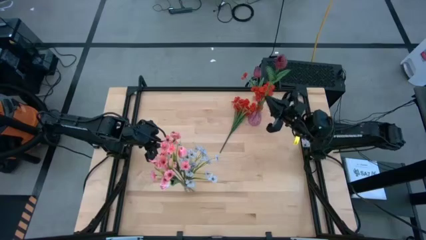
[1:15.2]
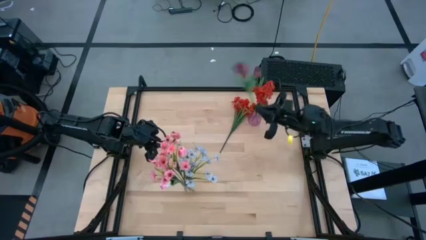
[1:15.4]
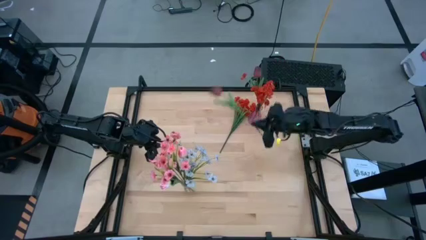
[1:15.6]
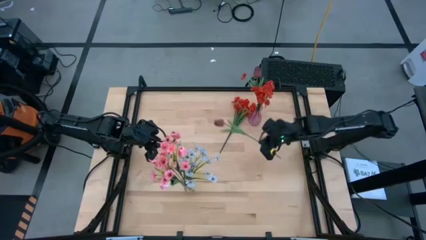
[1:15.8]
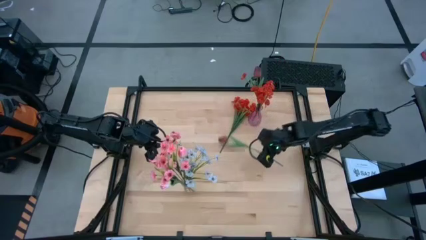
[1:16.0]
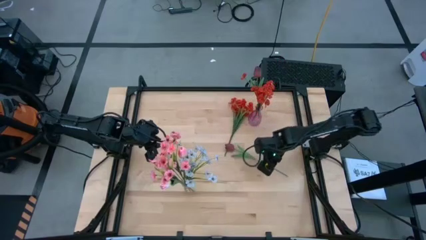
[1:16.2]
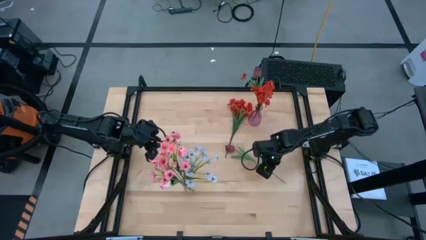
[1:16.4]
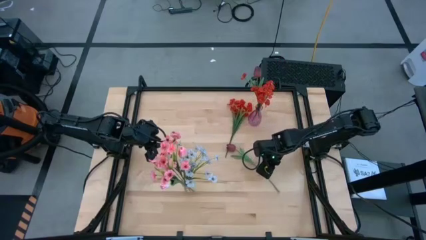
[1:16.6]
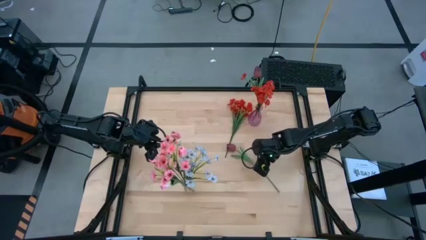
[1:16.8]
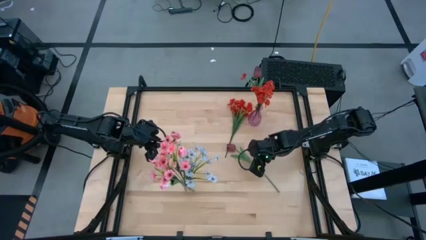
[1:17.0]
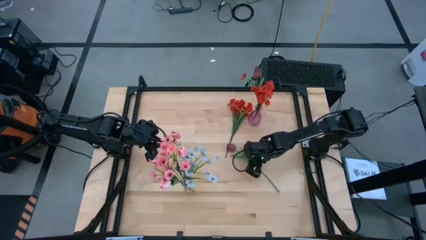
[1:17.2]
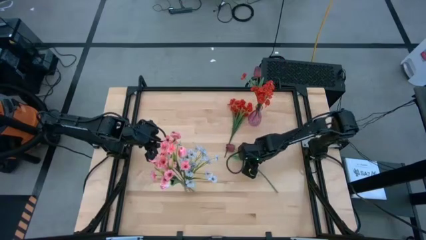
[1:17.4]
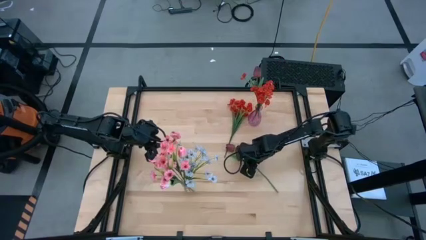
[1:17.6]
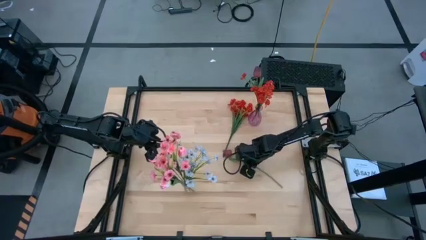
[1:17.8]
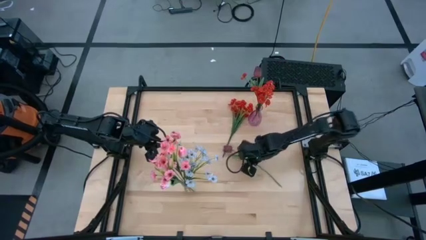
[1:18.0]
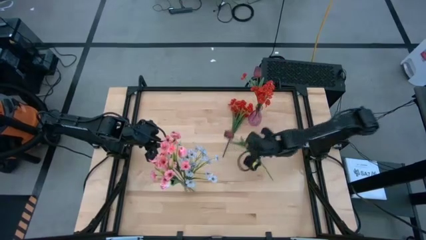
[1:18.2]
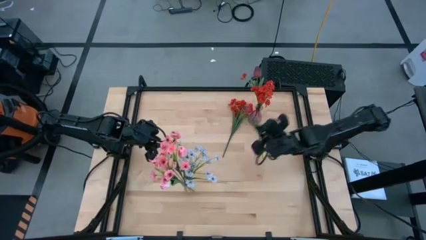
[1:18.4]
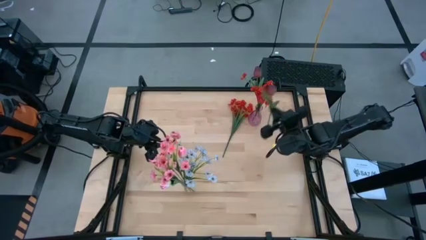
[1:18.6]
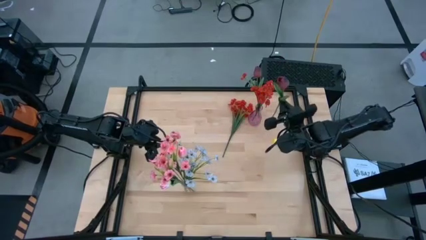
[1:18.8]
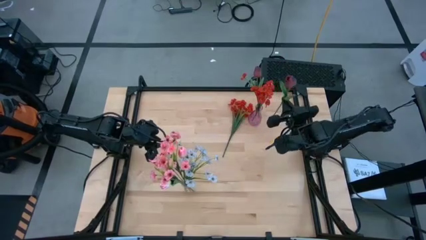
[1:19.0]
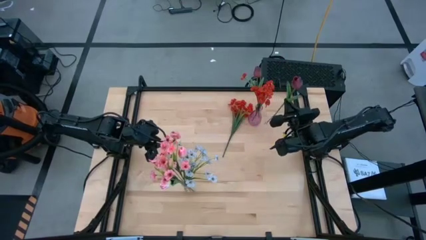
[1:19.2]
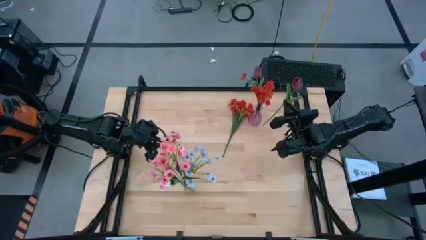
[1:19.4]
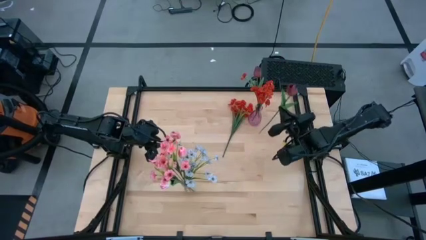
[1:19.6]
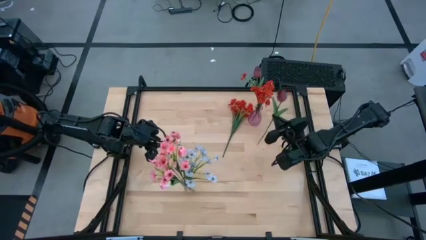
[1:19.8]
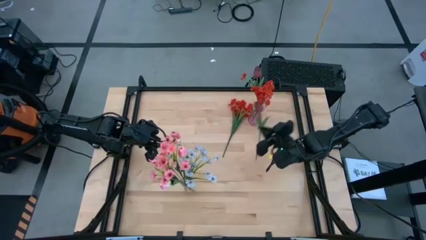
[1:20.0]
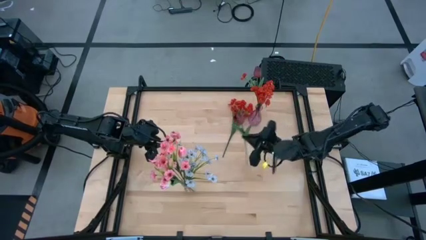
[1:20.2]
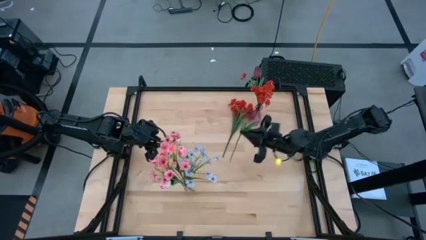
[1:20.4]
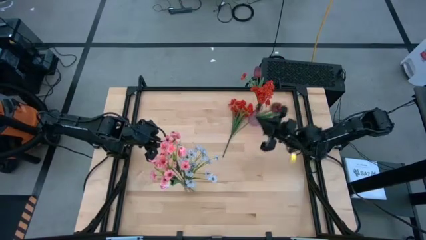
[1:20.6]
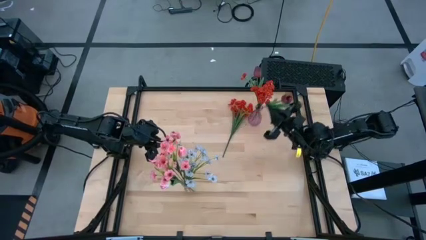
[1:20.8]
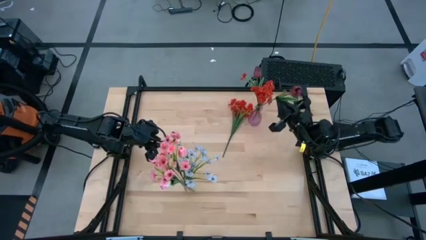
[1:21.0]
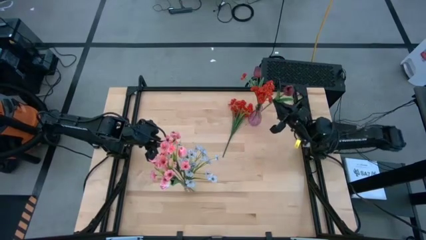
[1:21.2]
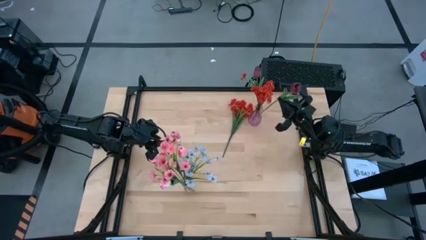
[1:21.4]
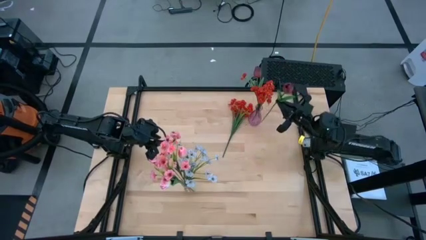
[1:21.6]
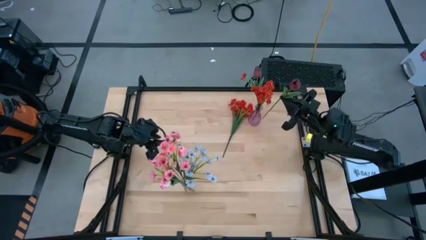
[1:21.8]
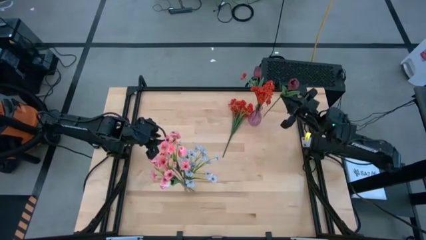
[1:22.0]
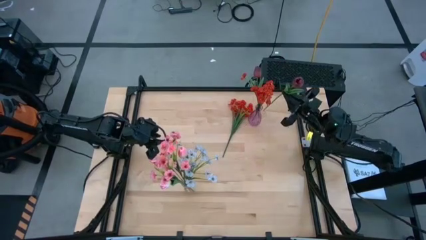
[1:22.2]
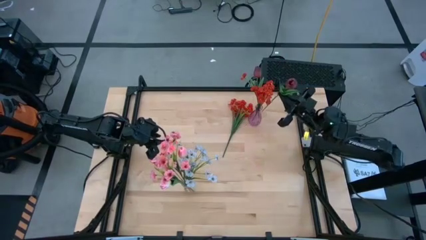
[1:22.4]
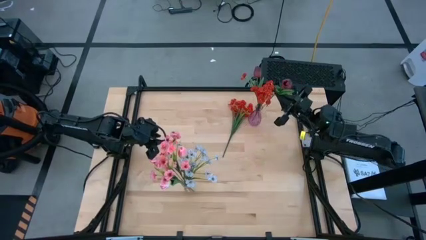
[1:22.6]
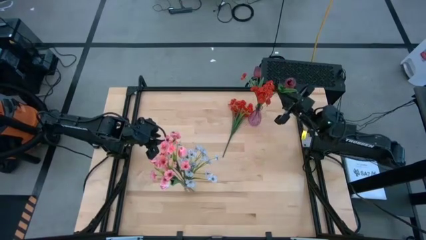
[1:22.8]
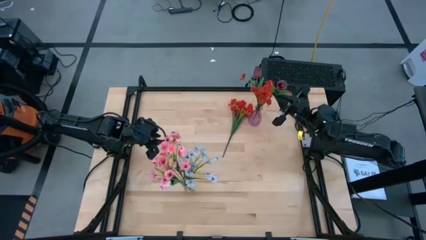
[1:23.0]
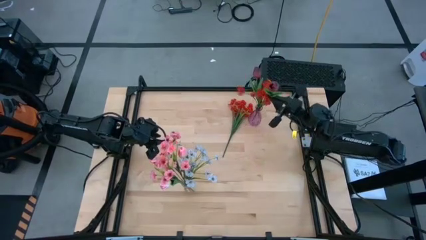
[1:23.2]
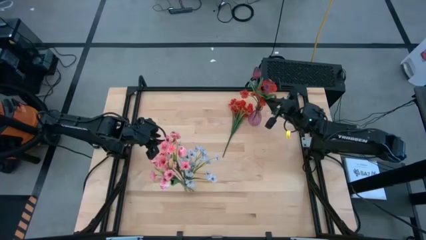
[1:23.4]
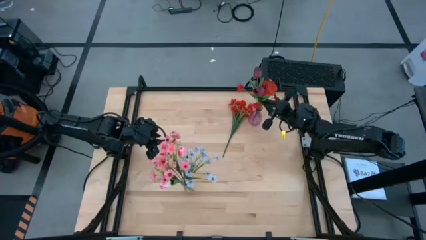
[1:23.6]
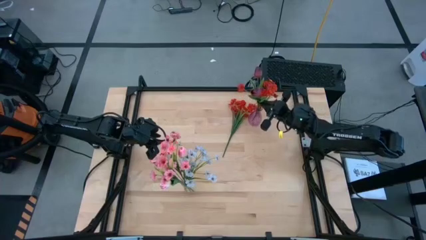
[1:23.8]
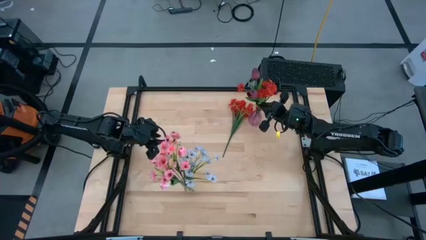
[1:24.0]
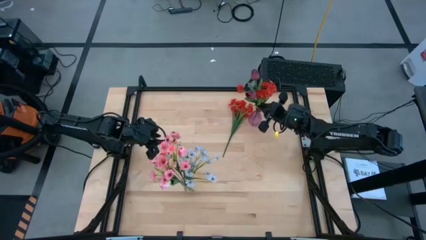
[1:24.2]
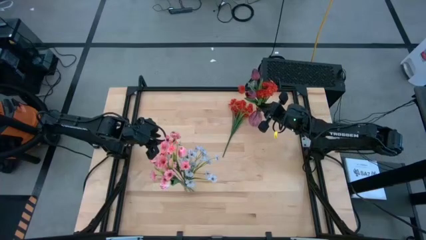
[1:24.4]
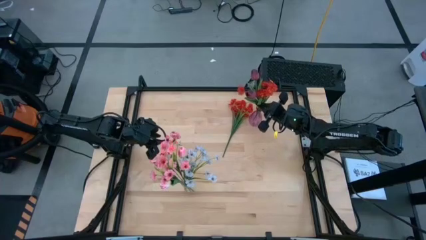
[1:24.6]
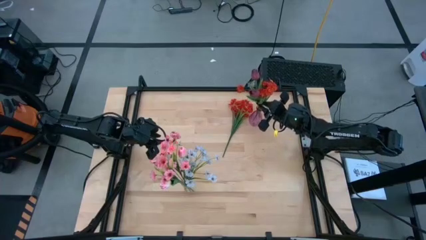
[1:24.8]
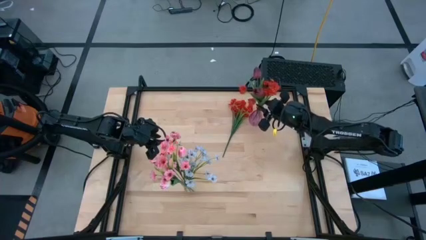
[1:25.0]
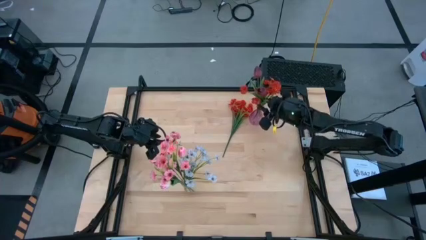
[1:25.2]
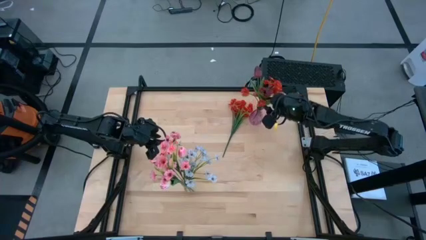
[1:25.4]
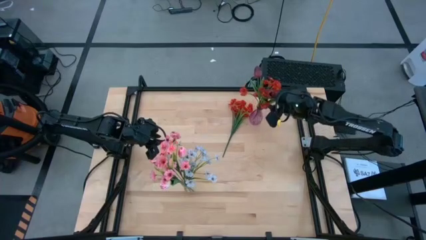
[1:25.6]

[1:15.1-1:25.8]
Task: Sort flowers into vase by color
Put the red flower into the purple vase

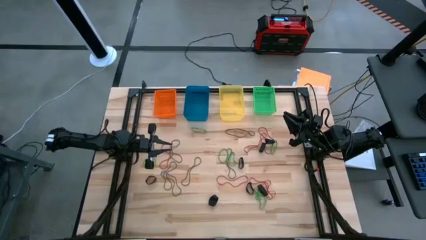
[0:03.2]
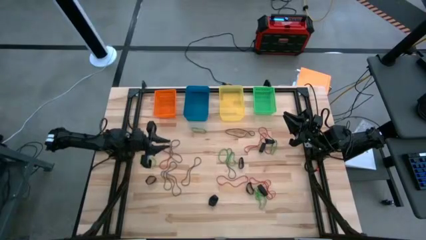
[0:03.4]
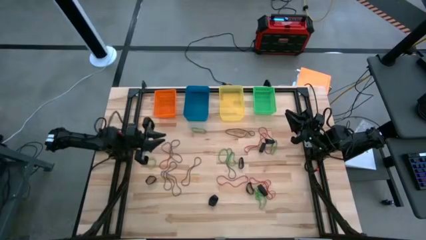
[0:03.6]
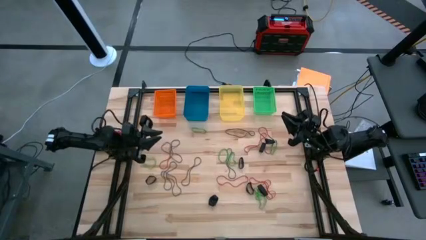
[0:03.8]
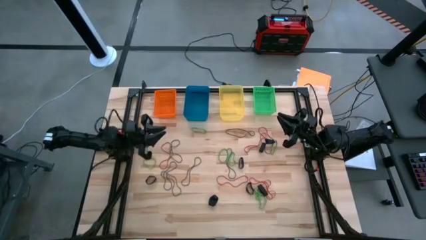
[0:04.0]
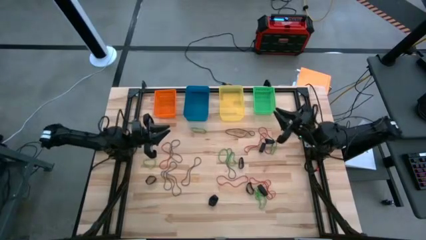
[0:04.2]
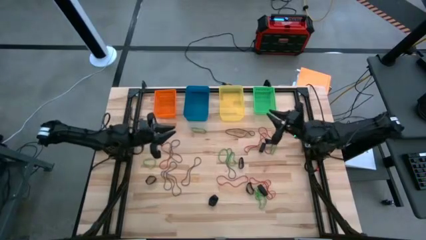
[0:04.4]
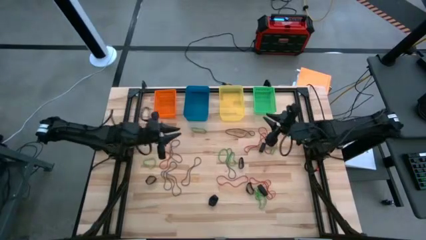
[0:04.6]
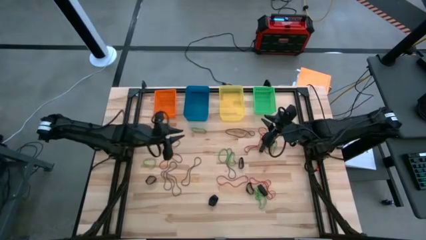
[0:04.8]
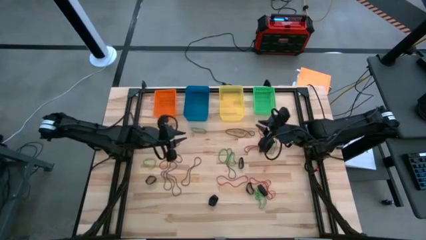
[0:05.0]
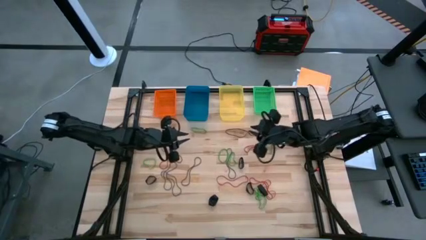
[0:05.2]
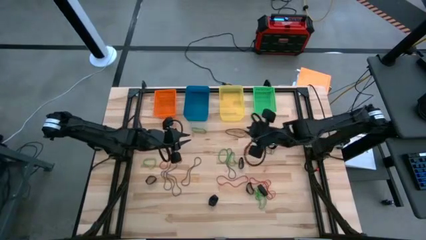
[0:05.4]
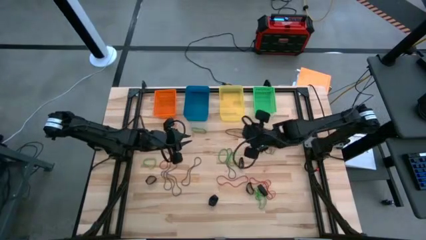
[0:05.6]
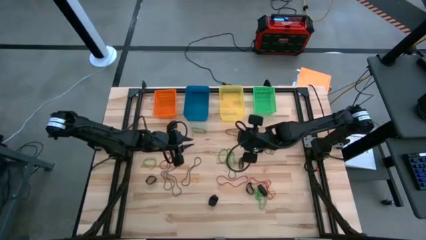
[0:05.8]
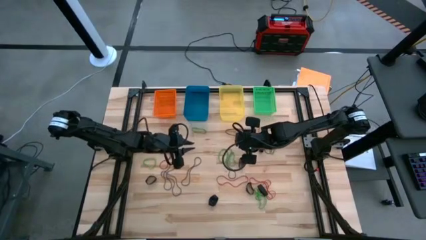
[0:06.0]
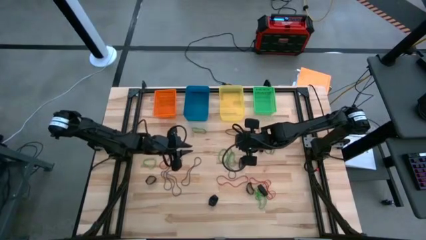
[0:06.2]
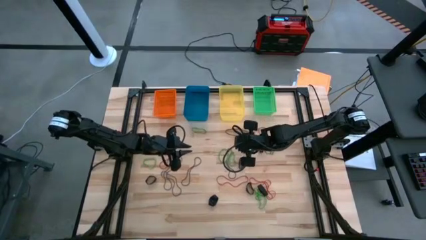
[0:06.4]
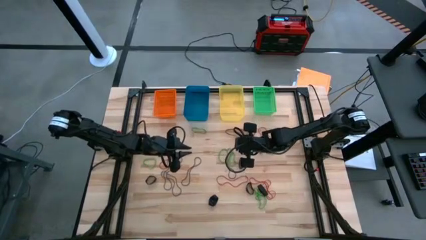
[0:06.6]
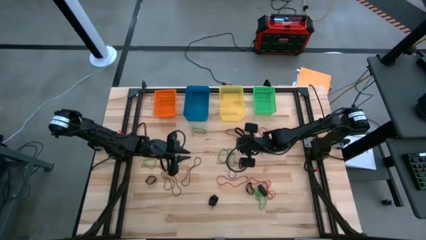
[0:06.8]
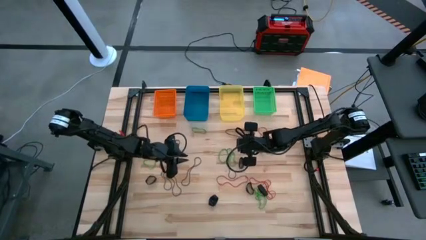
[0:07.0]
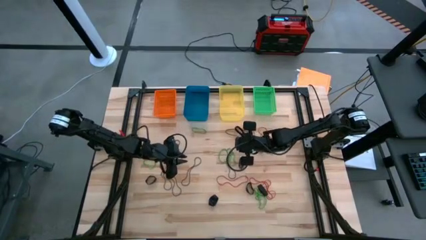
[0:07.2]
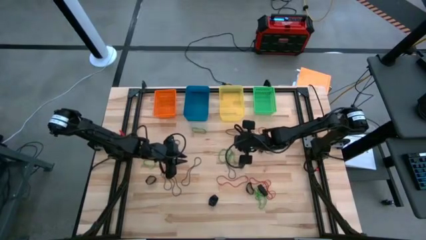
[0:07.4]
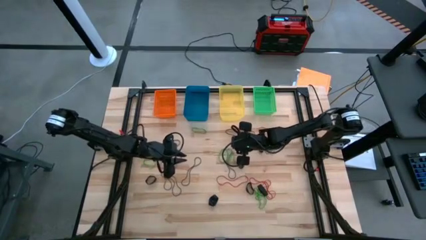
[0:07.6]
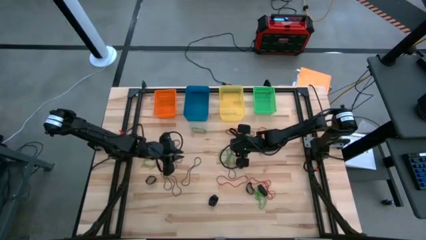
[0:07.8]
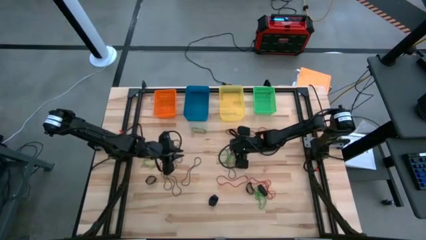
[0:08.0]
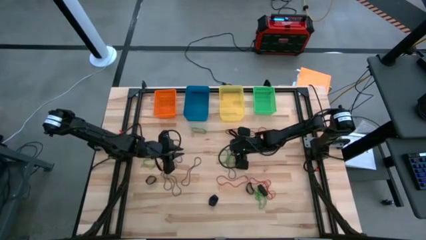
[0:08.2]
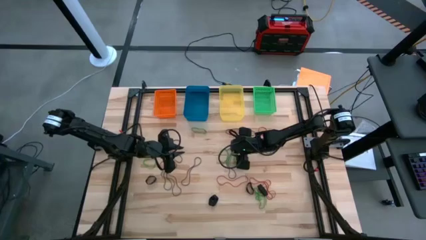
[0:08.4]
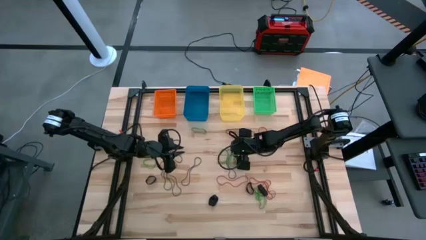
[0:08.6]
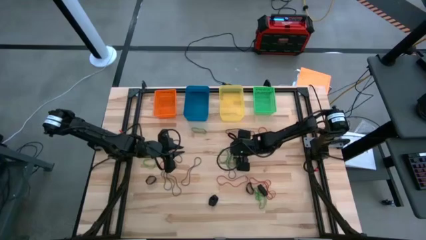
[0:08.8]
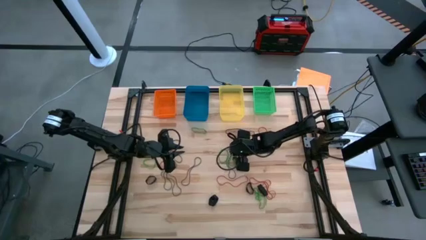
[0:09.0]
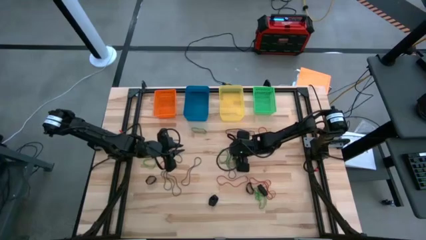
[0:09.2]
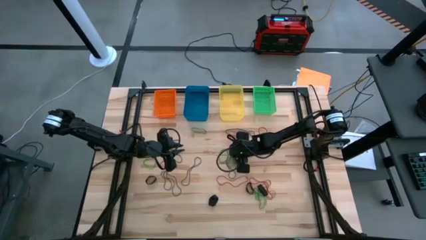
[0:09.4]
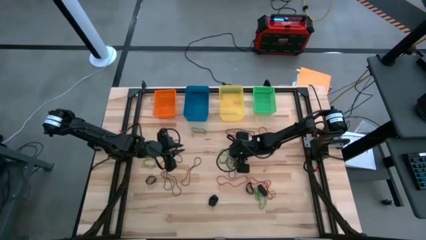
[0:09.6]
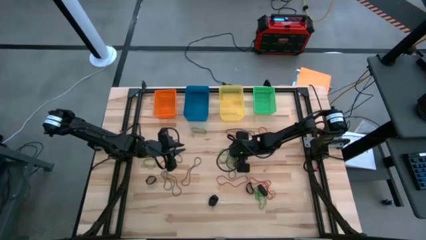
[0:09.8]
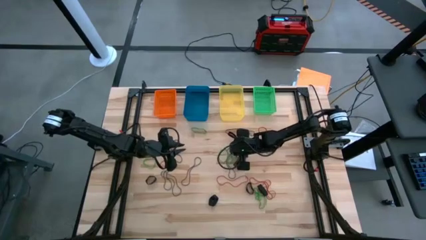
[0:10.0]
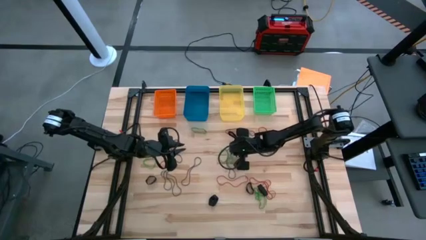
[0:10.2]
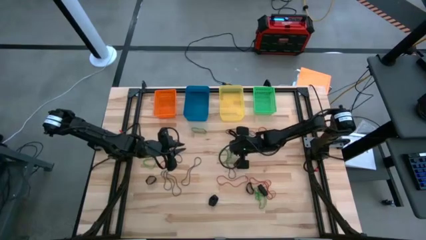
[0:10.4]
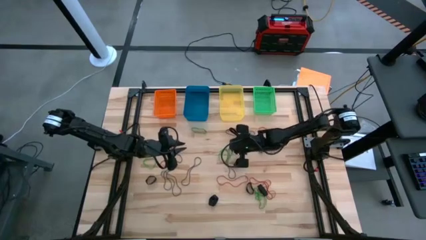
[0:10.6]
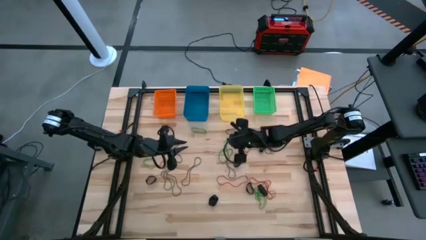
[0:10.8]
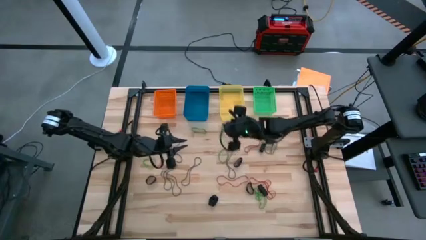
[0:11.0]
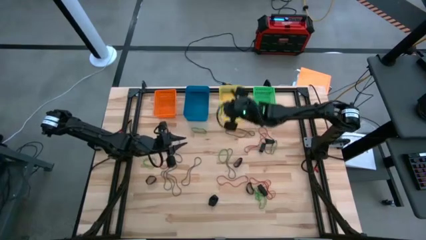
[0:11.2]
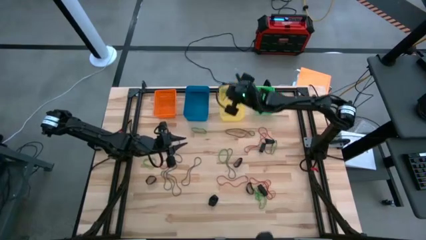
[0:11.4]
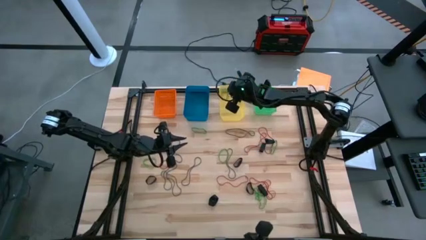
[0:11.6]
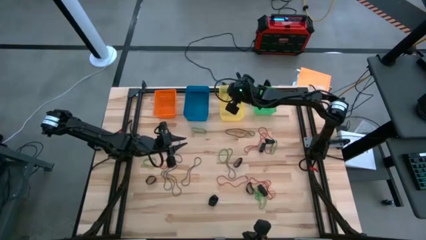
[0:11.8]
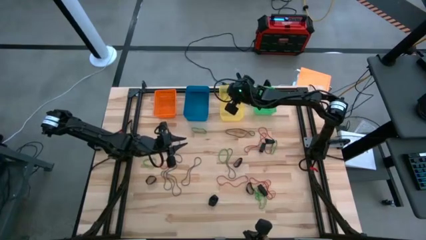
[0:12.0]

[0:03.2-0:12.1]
Task: Sort rubber bands into baskets
Put the green rubber band into the yellow bin
